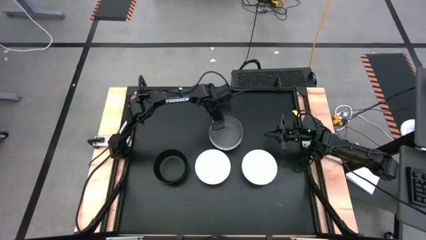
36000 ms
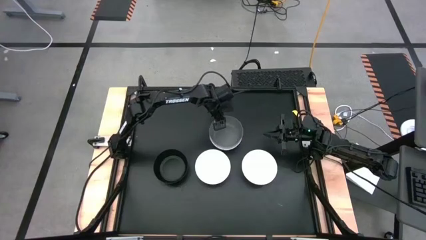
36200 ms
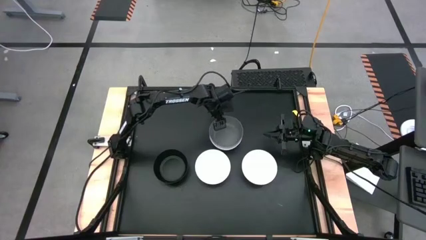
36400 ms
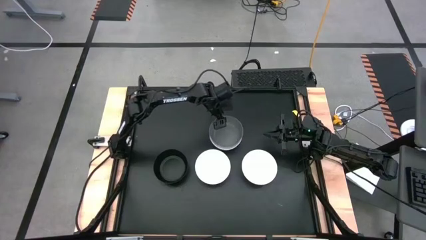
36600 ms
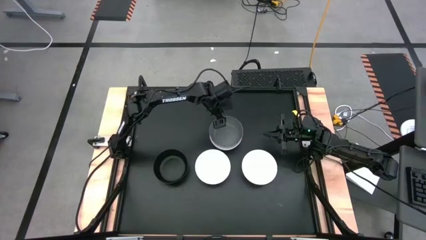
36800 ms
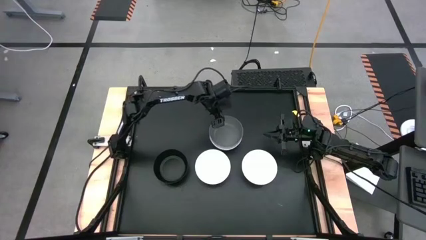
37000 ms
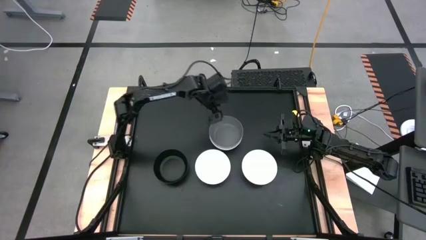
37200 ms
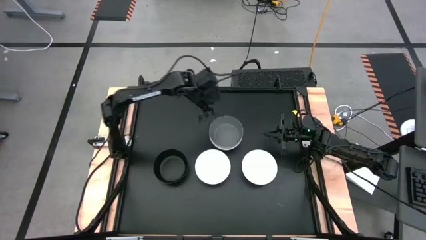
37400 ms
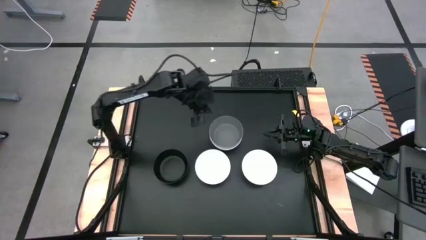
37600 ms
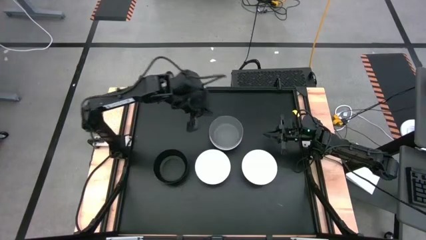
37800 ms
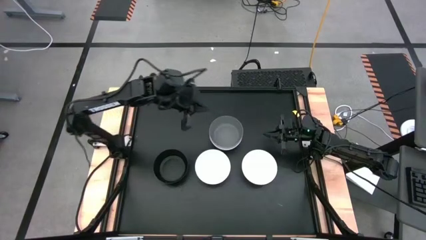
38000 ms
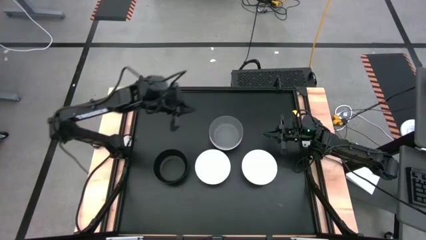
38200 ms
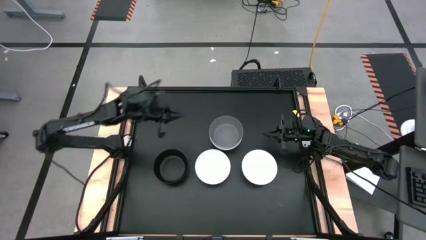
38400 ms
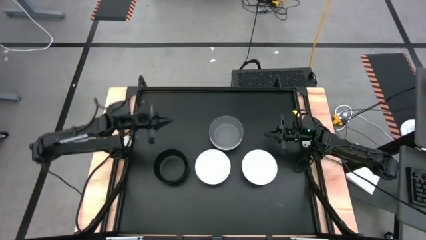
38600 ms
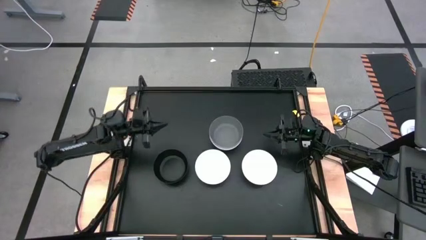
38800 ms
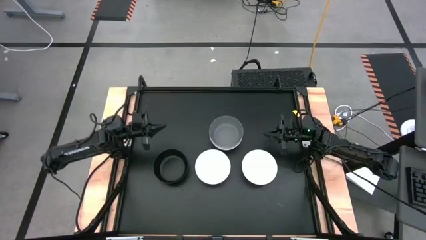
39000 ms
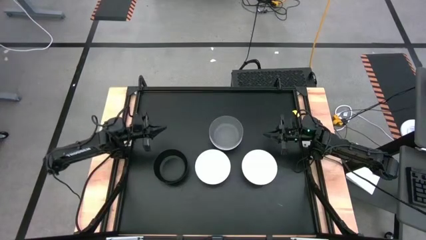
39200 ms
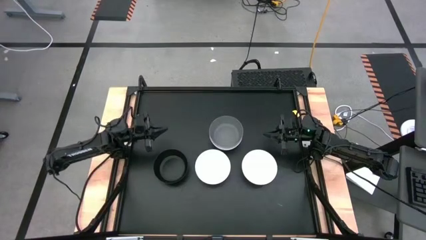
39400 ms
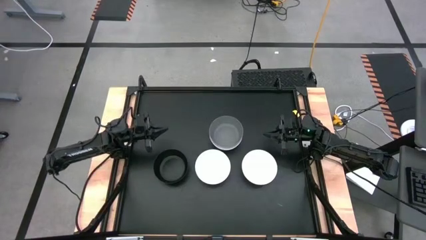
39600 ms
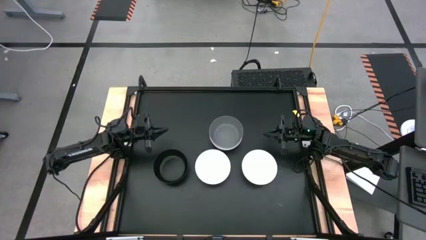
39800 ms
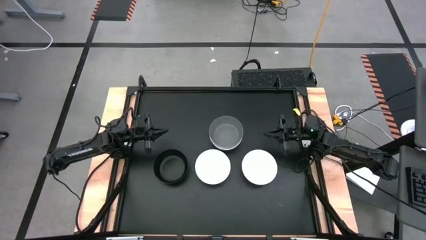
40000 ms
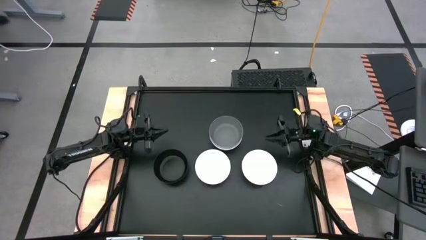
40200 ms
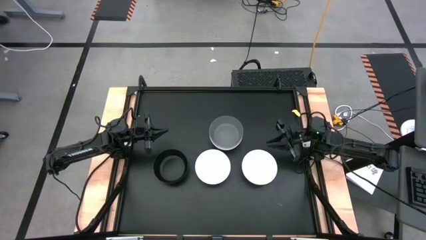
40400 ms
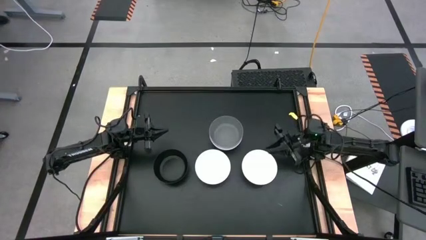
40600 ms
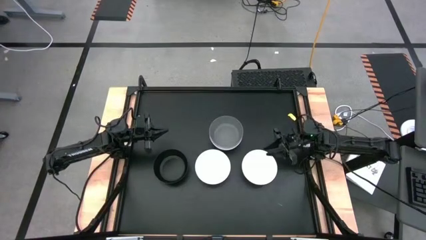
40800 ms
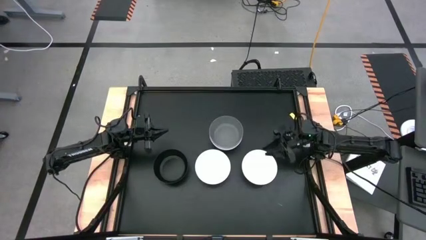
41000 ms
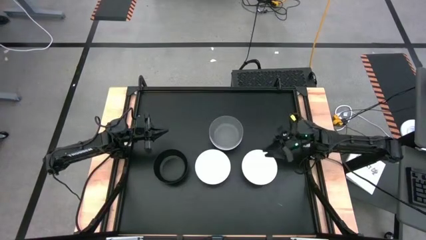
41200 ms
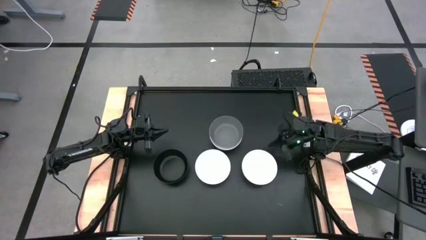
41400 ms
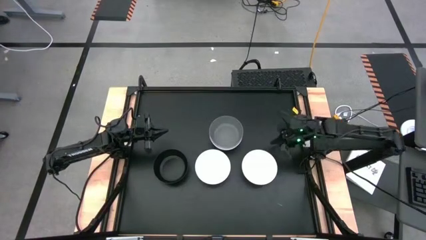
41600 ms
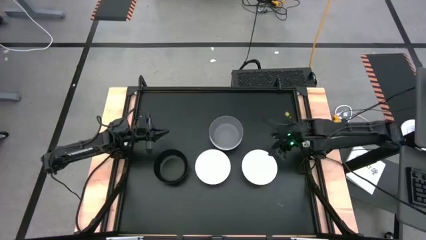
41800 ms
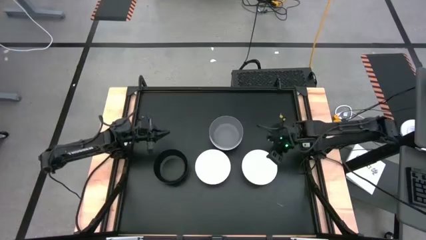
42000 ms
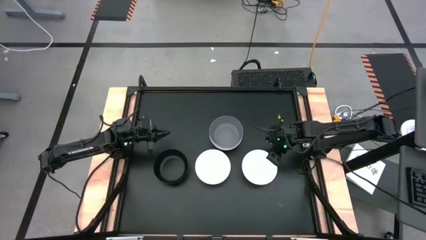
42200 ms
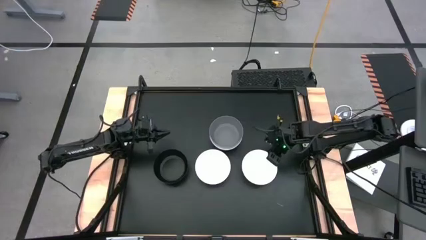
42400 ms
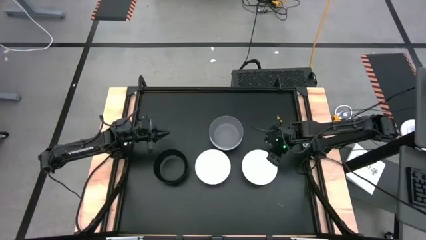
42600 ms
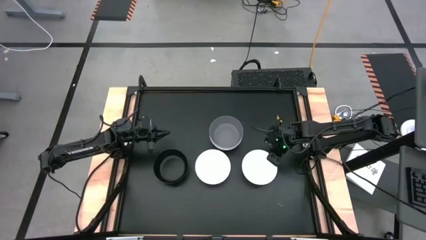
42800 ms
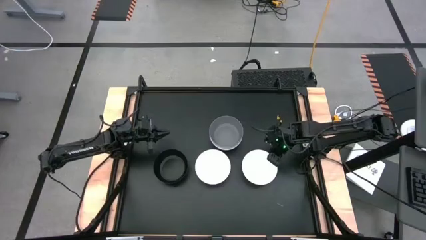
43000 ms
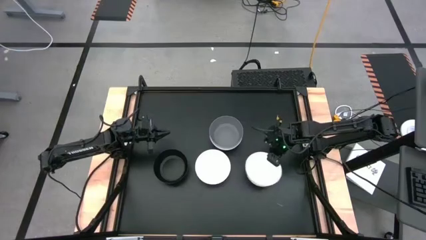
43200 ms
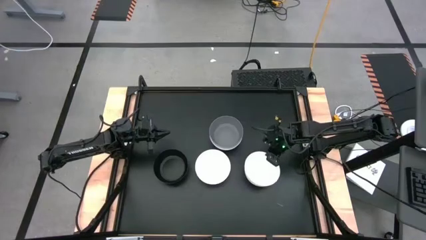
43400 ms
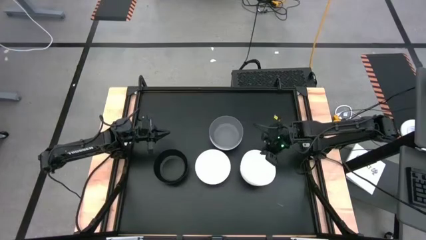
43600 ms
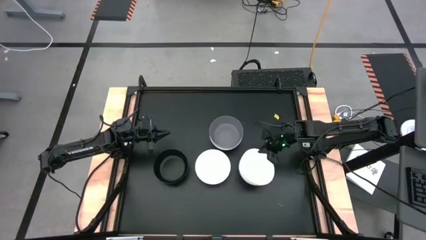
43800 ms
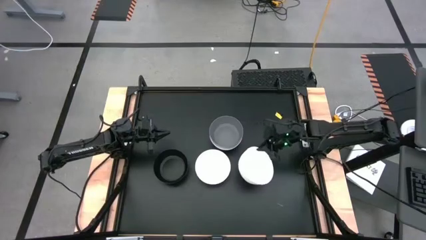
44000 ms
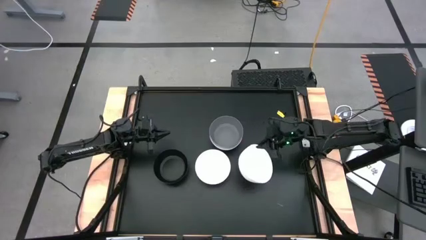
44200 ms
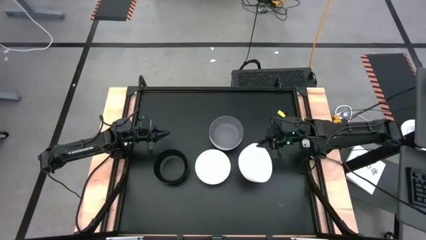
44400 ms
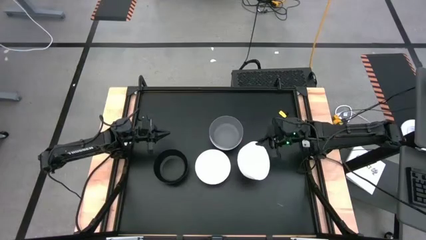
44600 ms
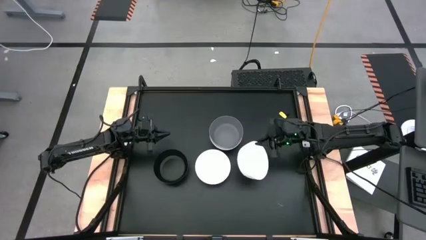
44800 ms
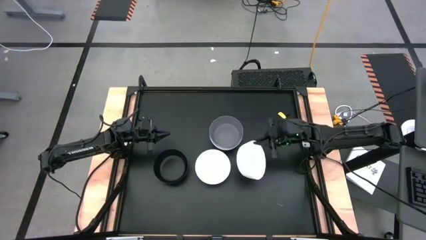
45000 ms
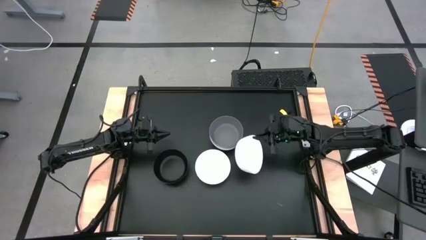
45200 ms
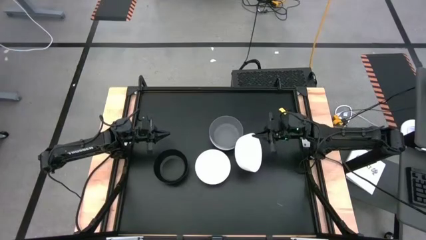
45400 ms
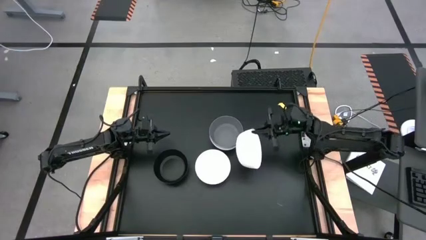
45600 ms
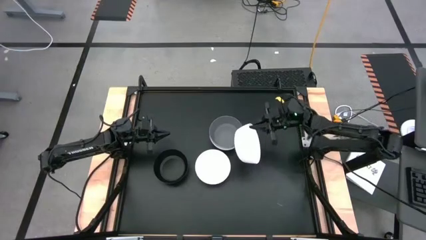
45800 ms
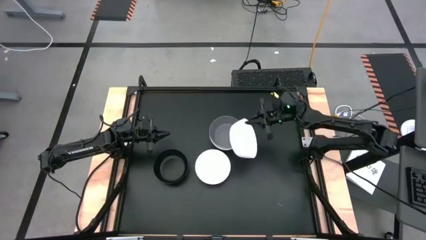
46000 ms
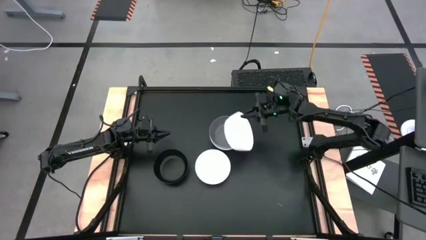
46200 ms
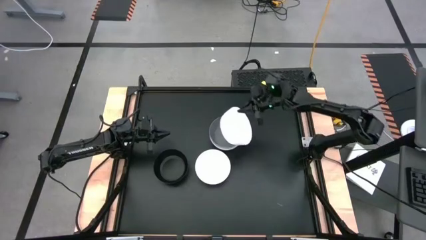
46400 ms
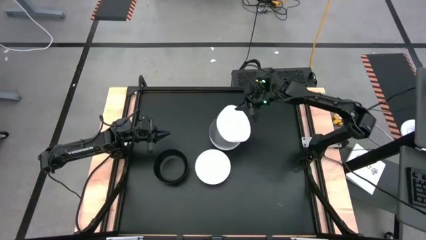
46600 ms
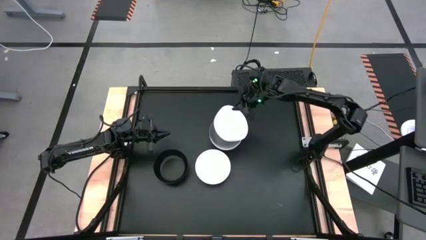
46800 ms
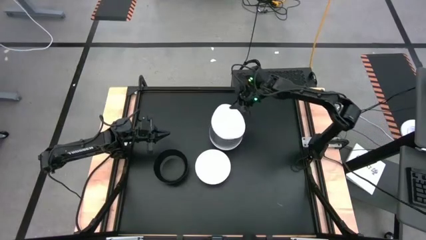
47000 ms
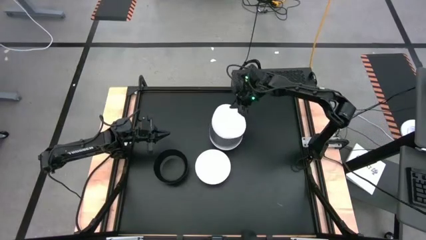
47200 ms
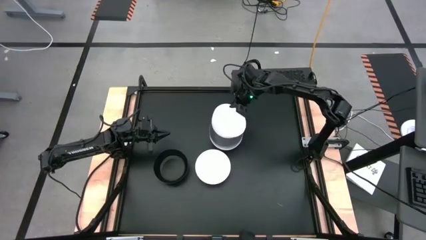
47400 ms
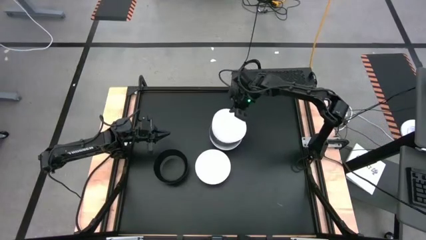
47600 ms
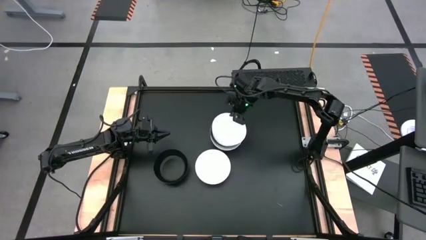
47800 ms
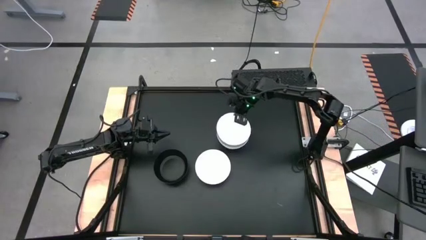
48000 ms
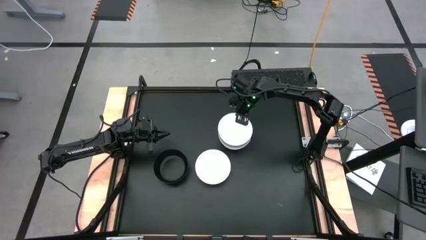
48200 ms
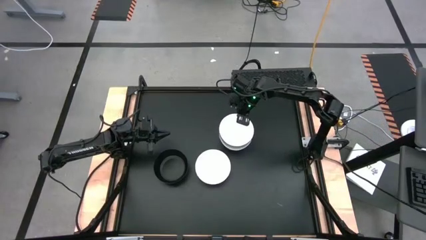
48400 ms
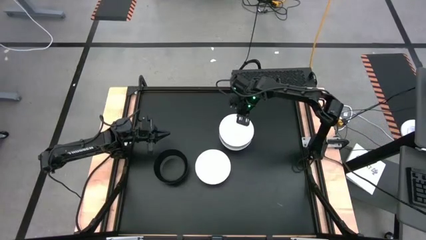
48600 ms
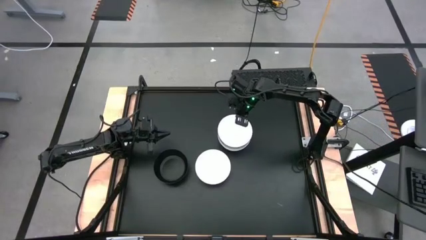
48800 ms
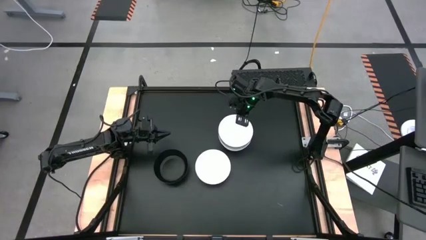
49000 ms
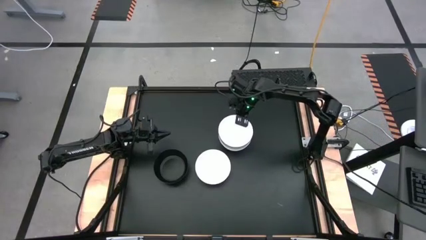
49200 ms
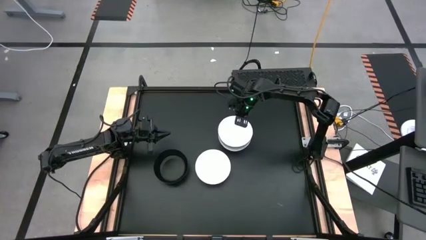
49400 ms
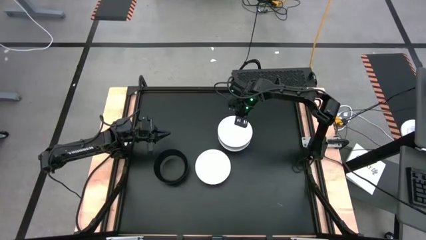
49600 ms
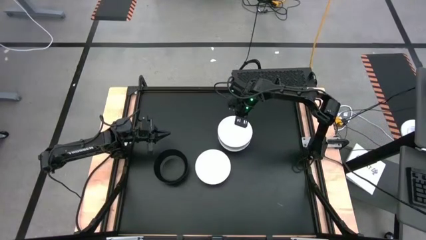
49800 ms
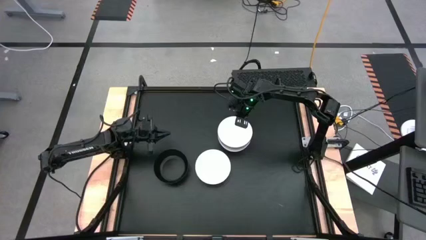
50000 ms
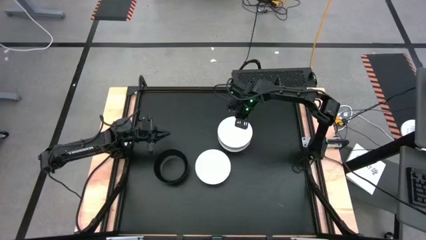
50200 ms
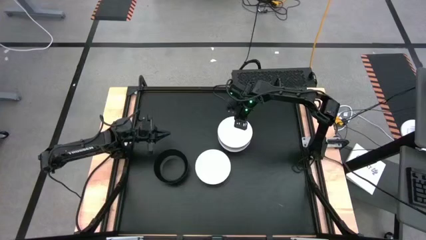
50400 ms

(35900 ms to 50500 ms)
Task: Nest bowls inside each other
Stack the right white bowl on top of the grey bowl
